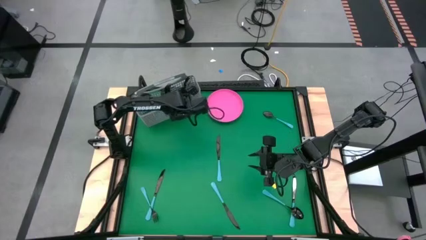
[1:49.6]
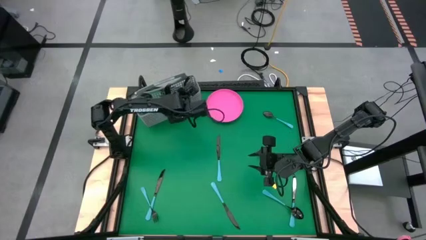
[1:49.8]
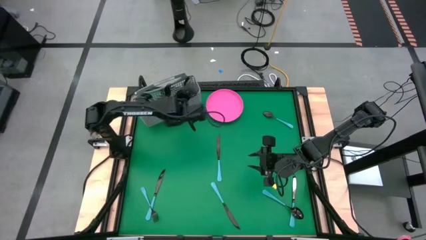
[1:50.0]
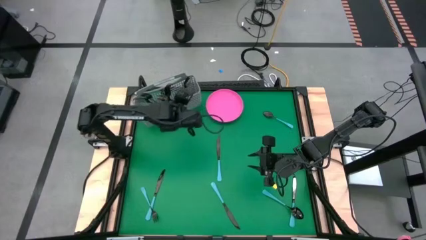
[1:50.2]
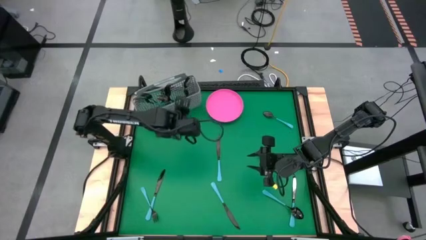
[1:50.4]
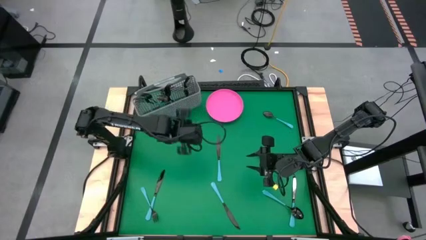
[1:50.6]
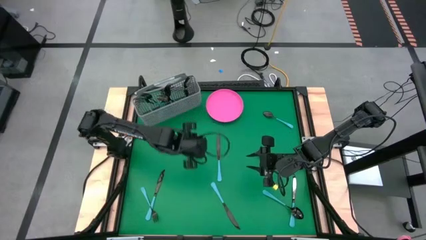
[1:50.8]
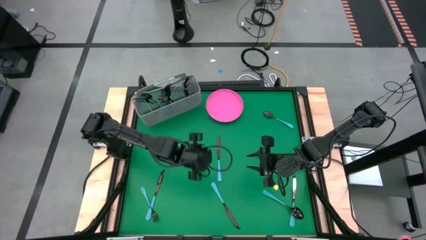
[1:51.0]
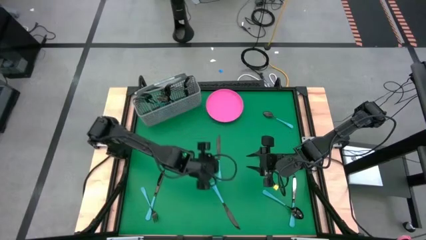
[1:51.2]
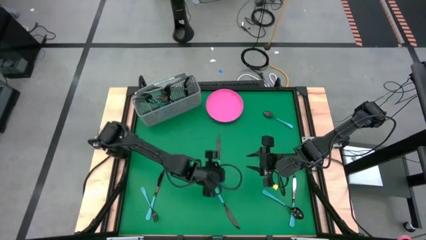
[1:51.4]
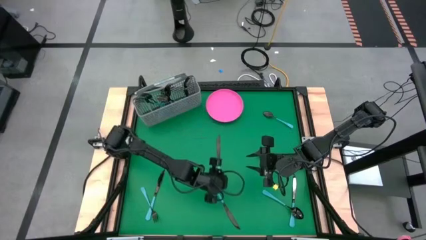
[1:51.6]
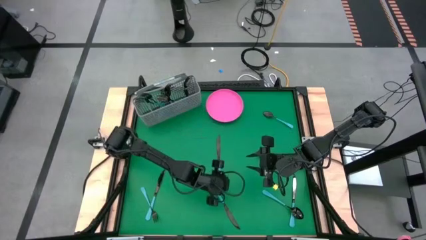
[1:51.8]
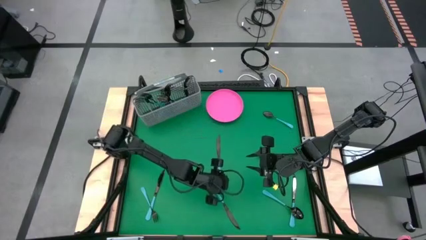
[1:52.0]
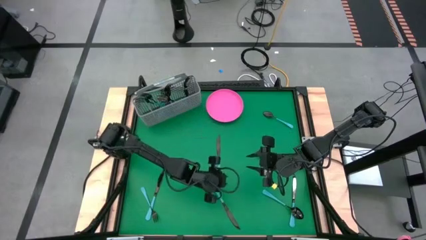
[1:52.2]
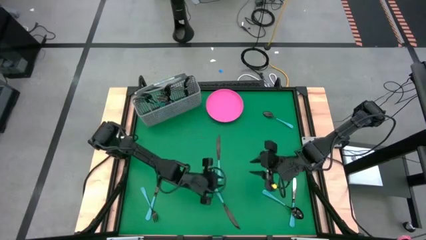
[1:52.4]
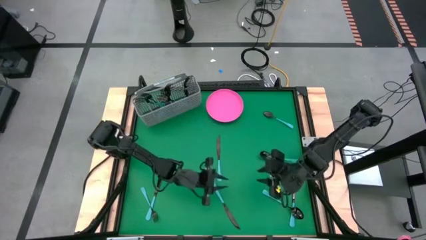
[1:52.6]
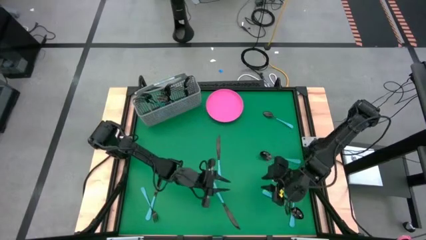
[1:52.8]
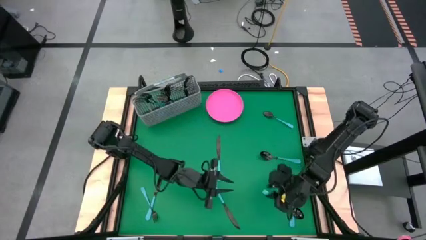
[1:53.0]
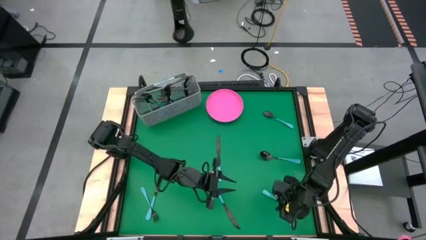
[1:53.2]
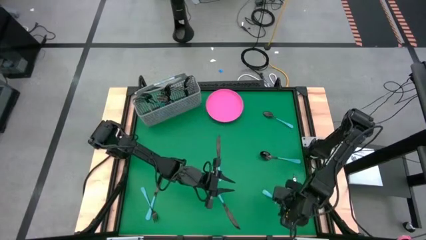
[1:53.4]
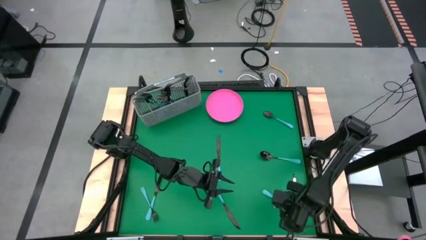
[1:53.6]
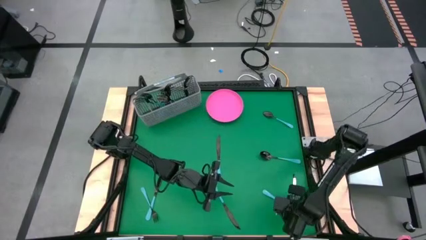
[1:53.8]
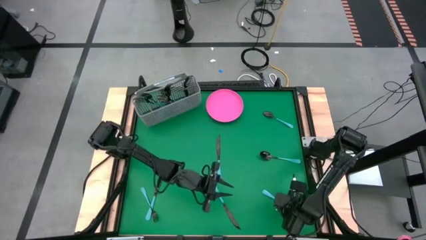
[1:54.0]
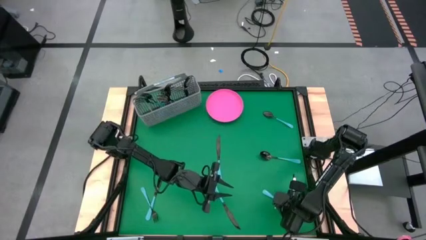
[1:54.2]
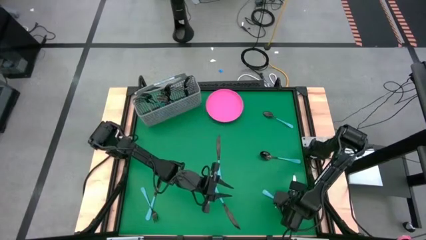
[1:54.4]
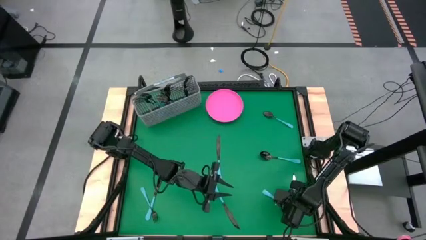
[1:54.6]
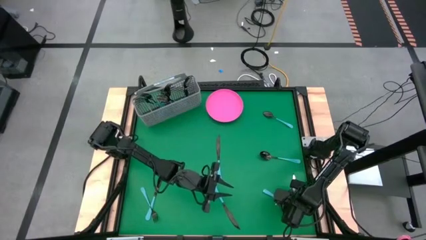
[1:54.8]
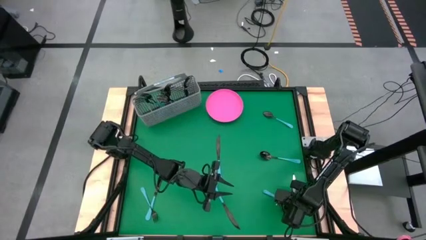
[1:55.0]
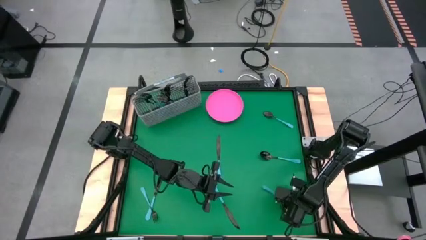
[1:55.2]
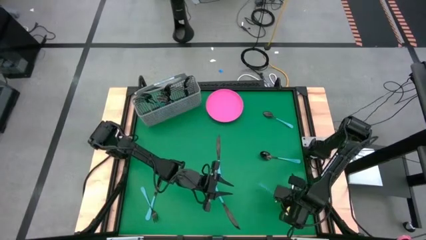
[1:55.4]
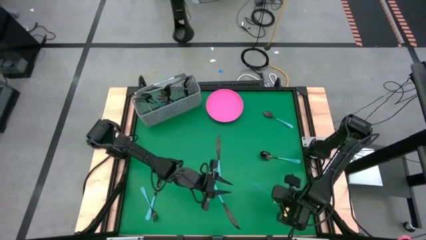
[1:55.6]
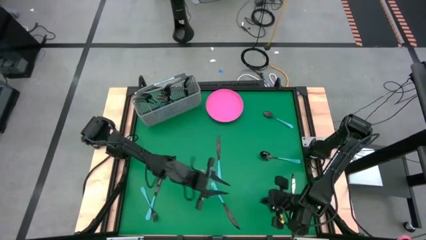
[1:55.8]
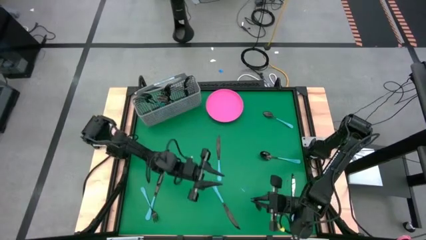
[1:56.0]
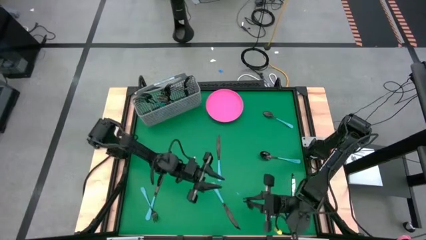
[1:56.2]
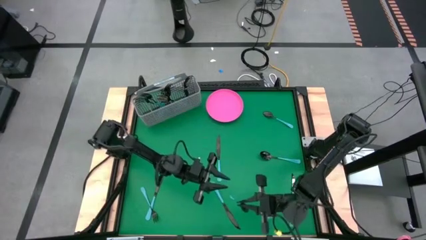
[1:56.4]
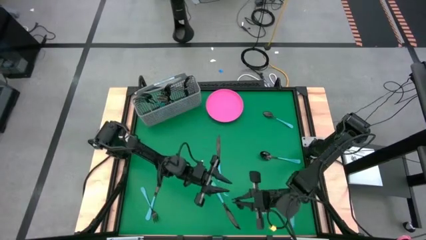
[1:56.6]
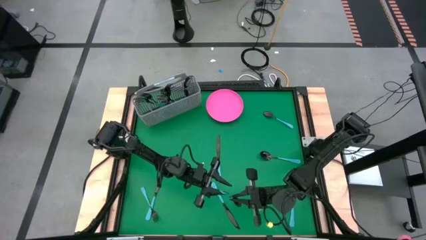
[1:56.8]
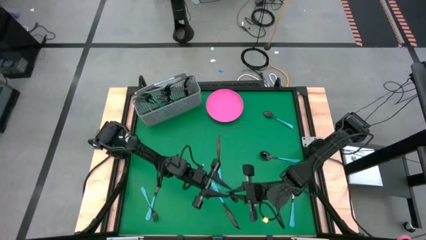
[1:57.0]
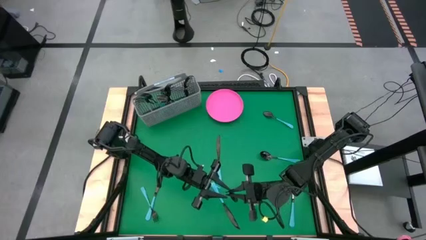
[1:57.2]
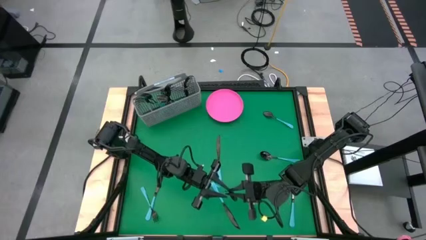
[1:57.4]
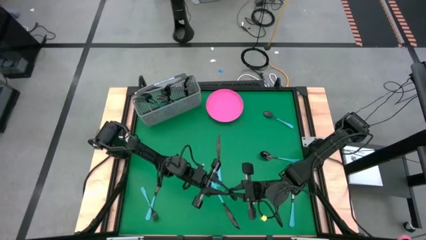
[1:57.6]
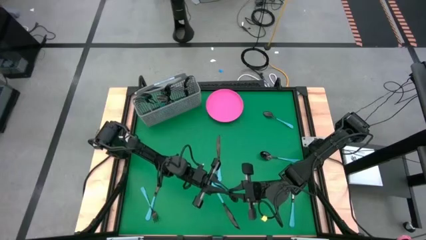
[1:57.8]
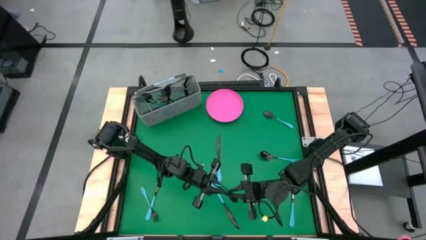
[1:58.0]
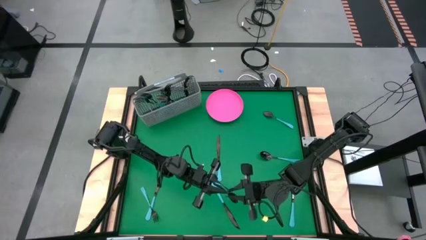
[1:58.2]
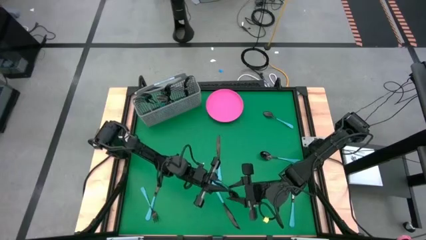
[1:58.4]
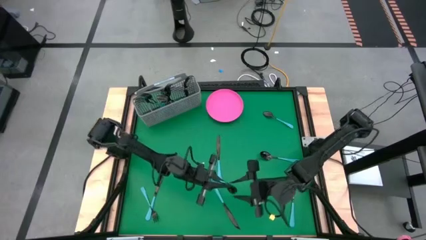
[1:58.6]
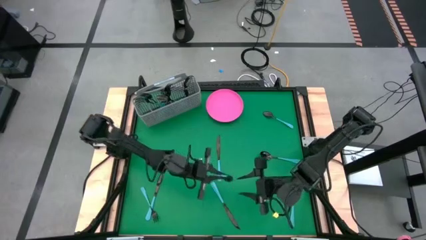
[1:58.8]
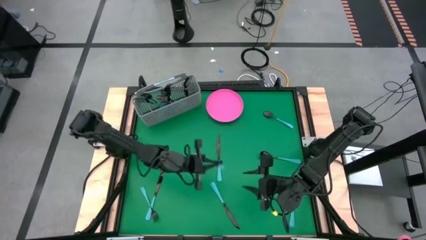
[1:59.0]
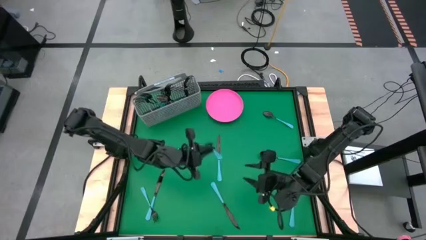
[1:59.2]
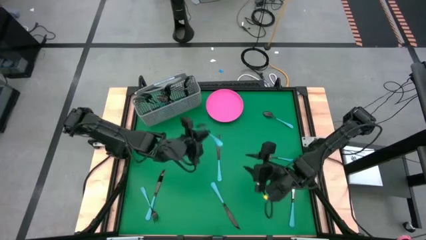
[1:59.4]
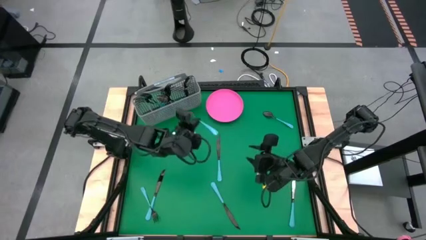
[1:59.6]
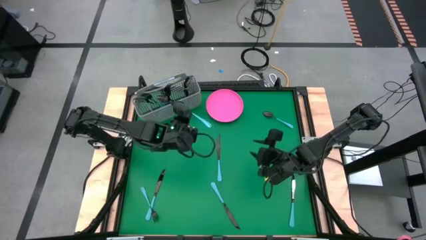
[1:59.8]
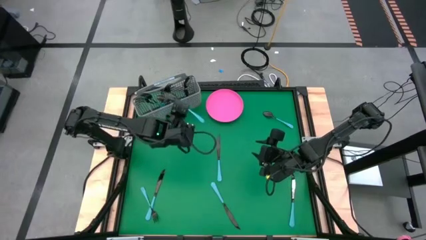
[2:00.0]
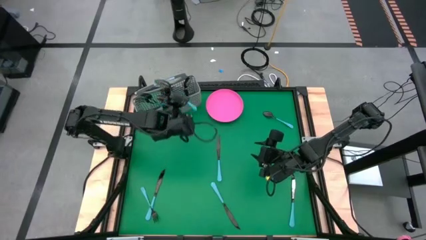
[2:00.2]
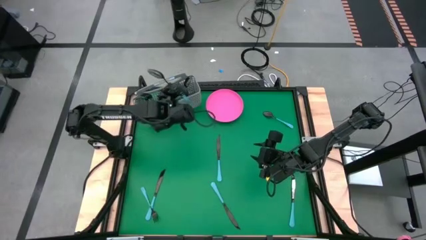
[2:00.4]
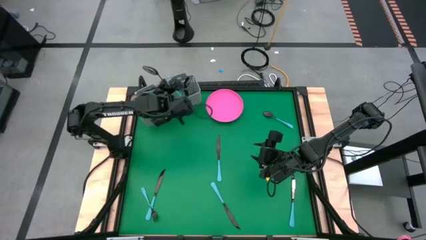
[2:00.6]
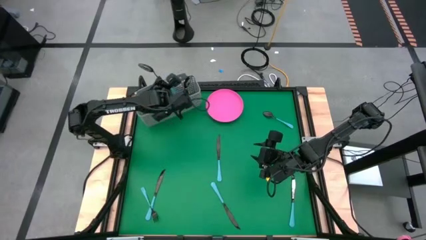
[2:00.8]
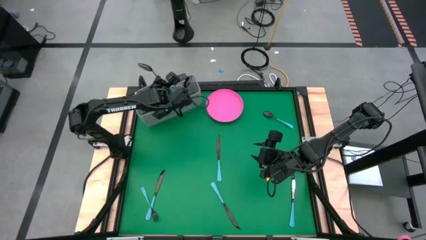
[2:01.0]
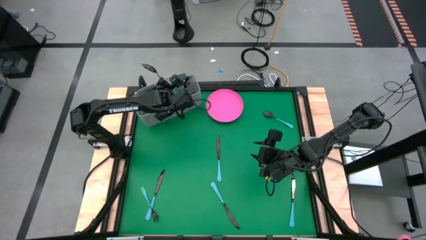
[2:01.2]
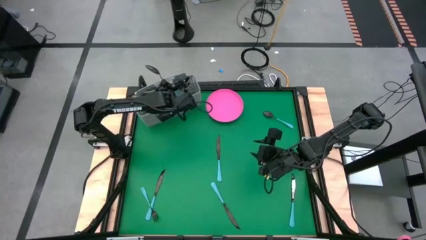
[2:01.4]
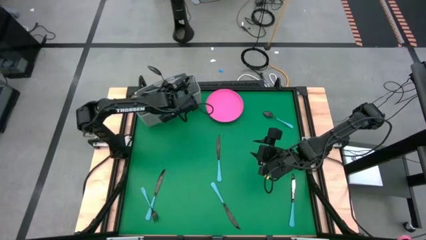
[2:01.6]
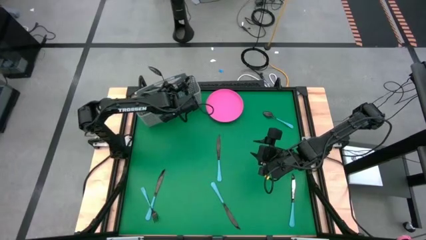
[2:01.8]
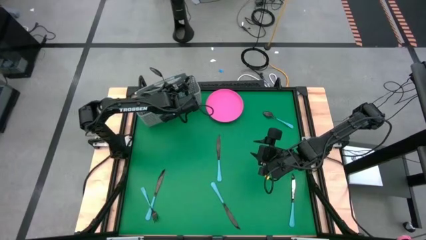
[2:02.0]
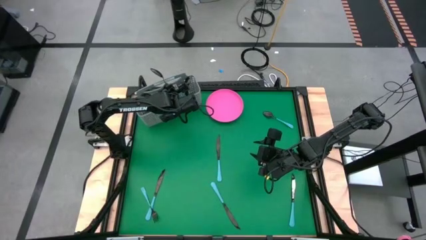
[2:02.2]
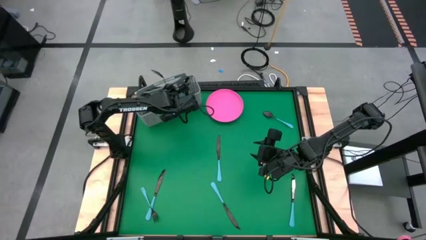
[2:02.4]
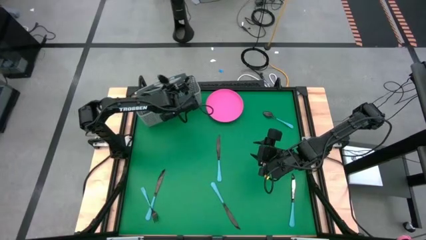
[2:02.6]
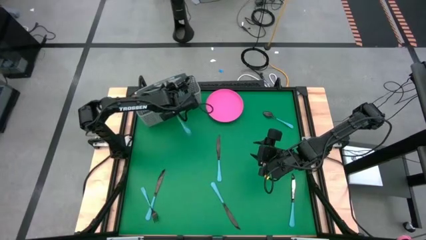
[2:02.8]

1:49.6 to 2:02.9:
Task: Sort silverware
Put the blue spoon into the gray silverware holder

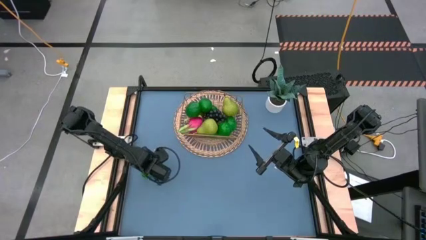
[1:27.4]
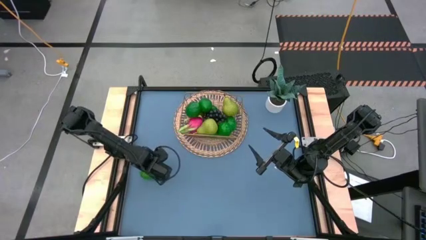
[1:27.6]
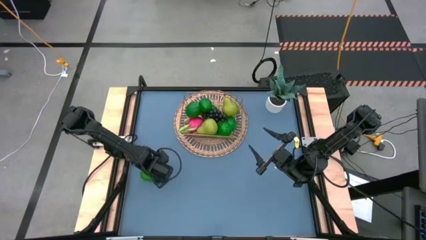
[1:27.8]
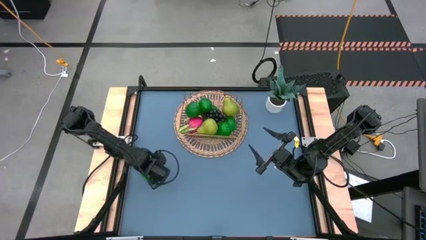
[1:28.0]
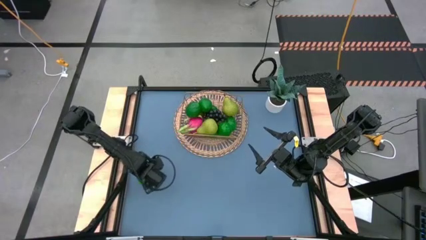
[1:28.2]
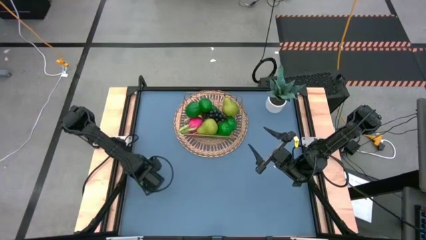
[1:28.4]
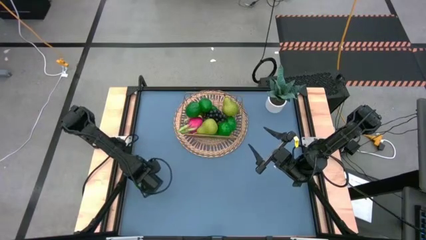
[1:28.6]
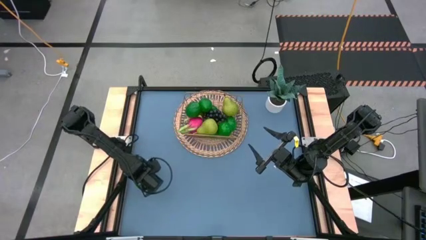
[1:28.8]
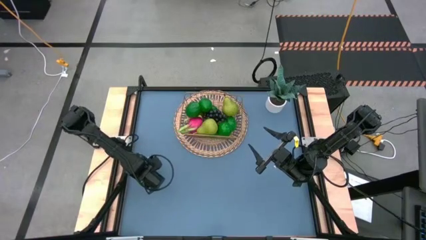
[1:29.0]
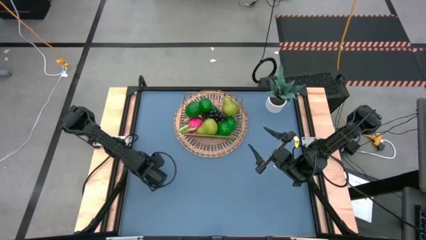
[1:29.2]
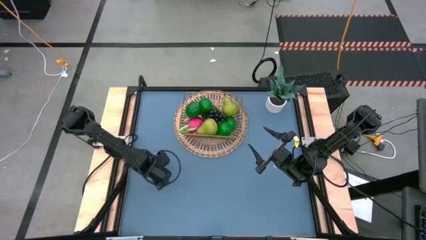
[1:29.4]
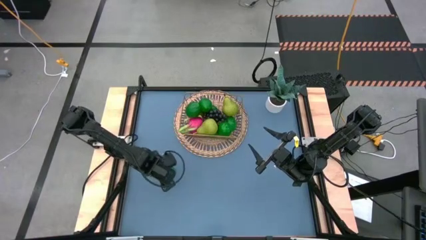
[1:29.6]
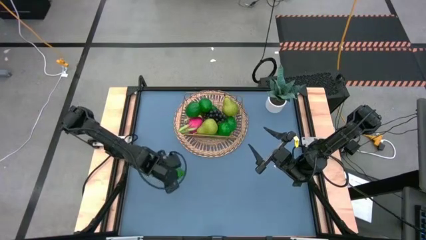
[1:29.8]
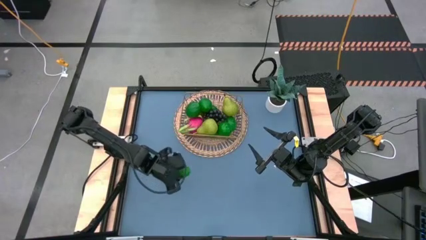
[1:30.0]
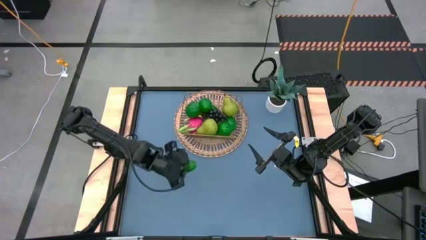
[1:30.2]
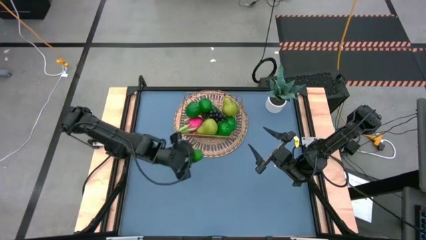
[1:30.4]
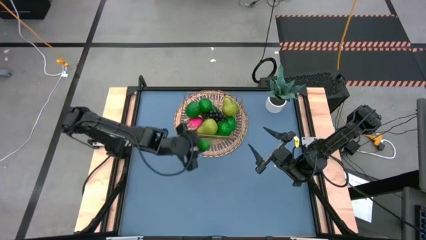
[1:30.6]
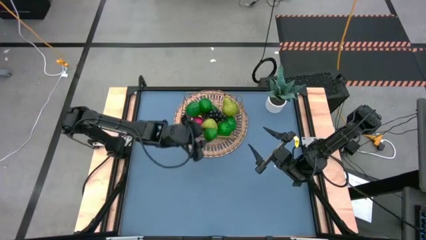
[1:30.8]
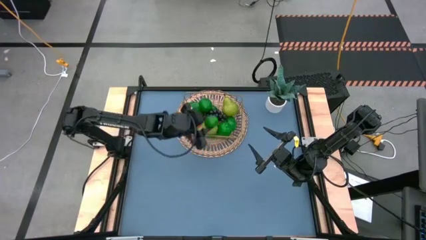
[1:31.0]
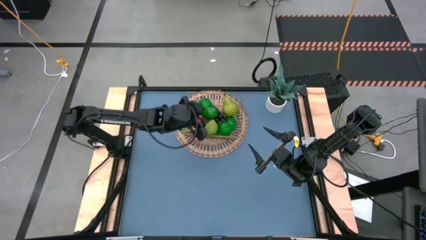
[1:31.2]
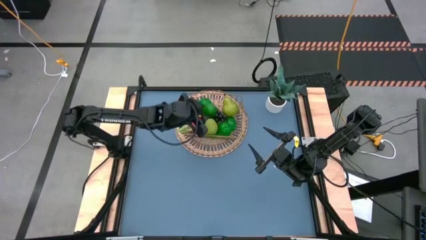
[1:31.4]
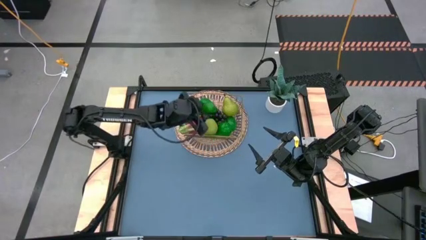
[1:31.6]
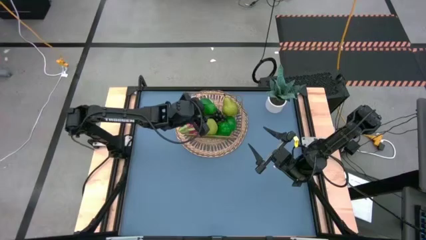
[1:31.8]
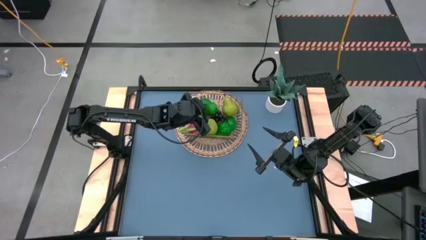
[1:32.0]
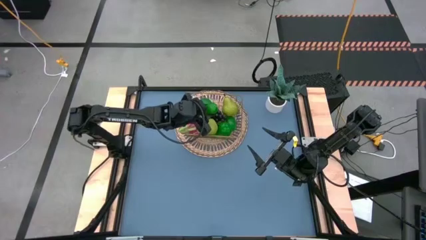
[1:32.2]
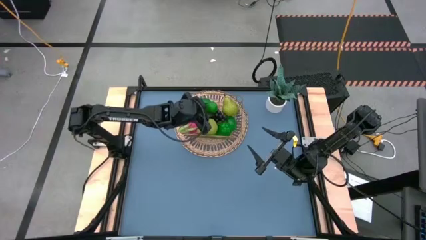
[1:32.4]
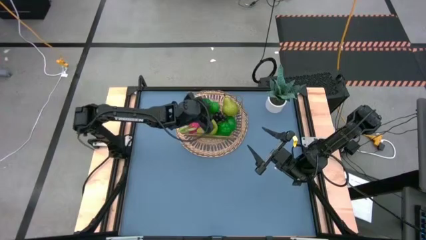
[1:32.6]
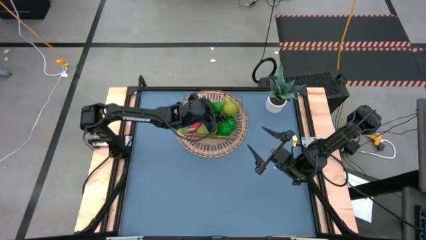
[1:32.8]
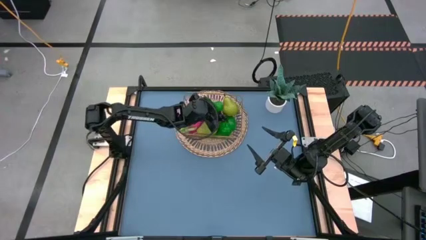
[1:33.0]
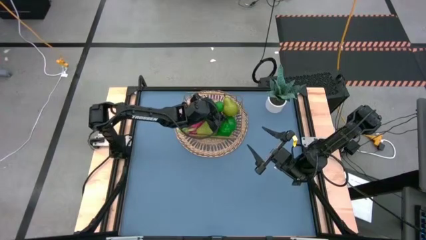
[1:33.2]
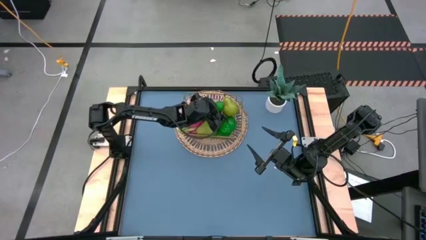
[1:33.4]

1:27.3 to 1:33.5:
Task: Build produce basket
Put the green lime into the gold wire basket
